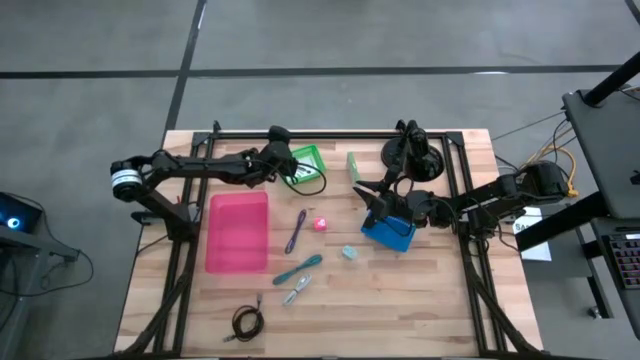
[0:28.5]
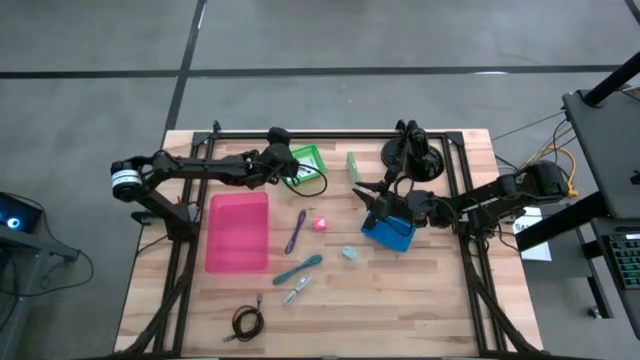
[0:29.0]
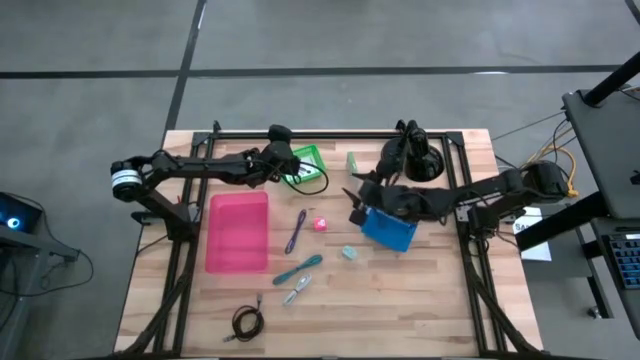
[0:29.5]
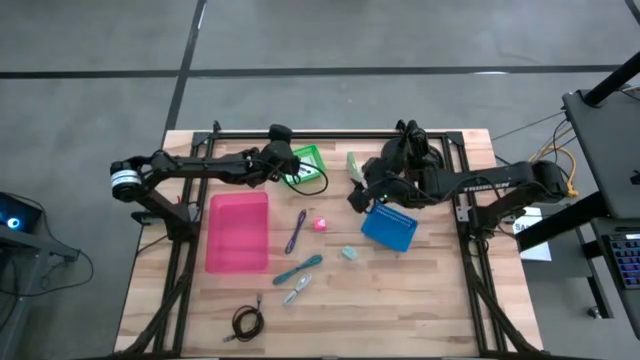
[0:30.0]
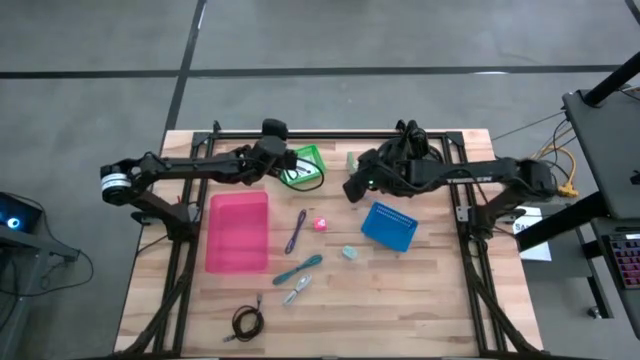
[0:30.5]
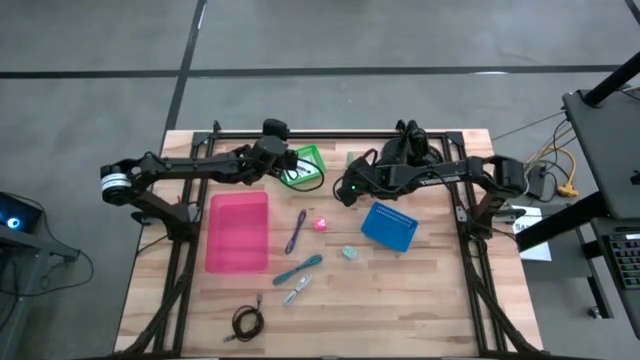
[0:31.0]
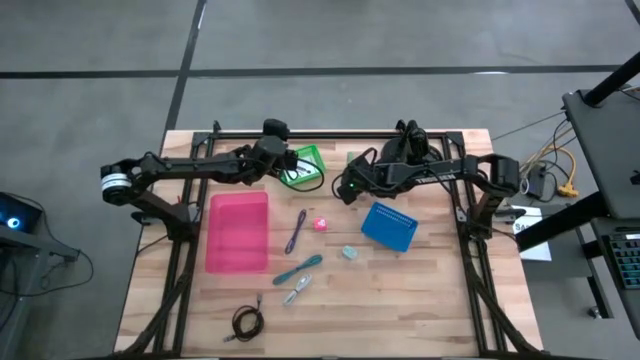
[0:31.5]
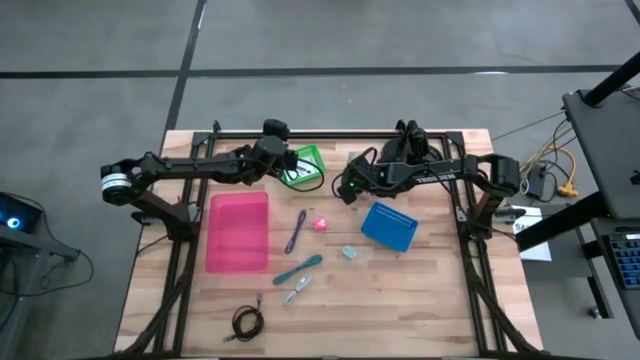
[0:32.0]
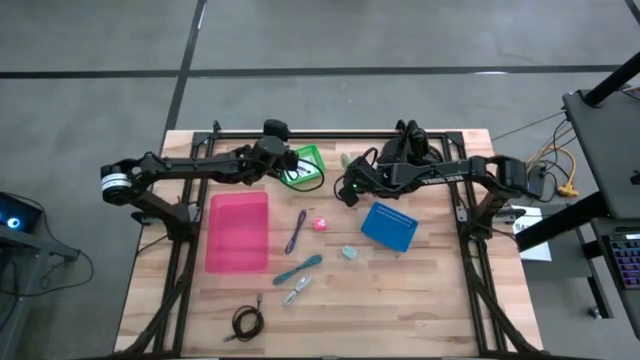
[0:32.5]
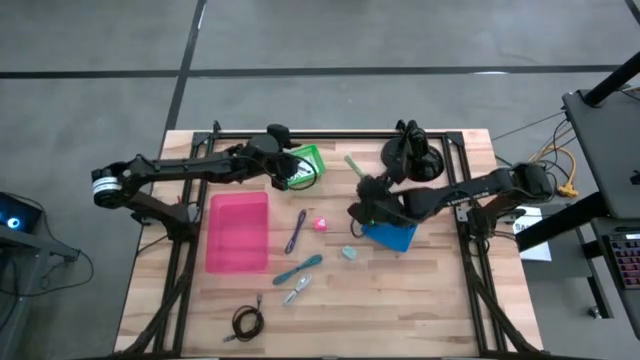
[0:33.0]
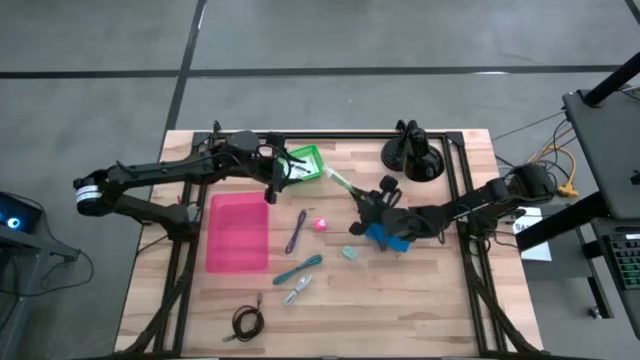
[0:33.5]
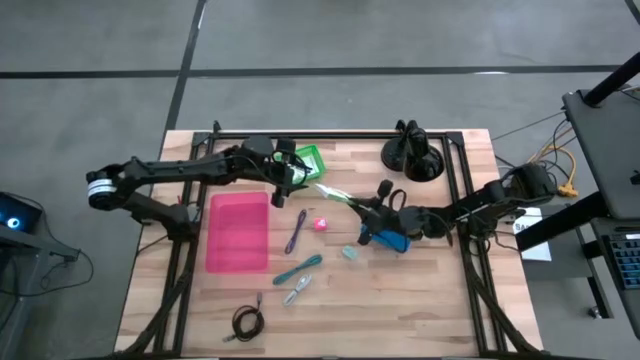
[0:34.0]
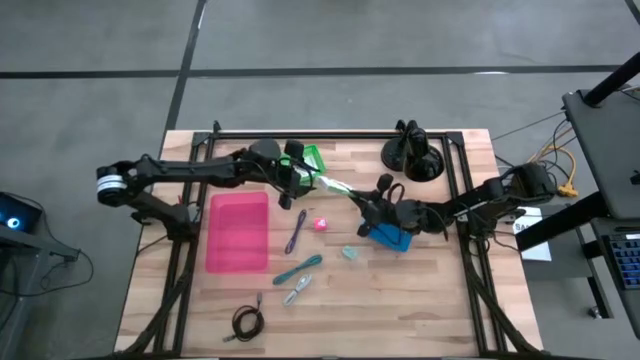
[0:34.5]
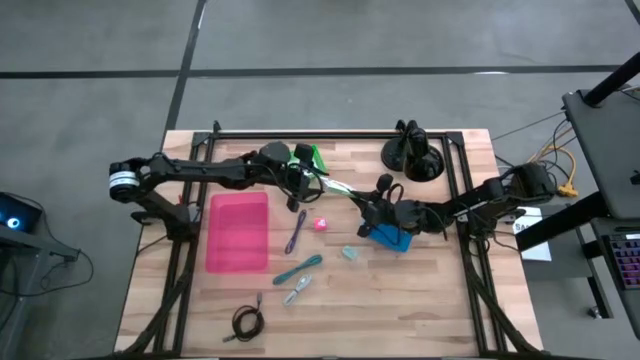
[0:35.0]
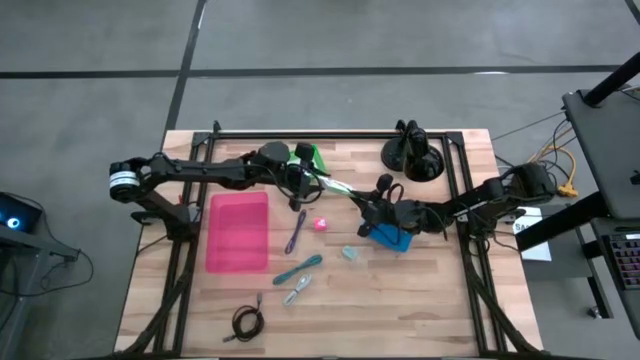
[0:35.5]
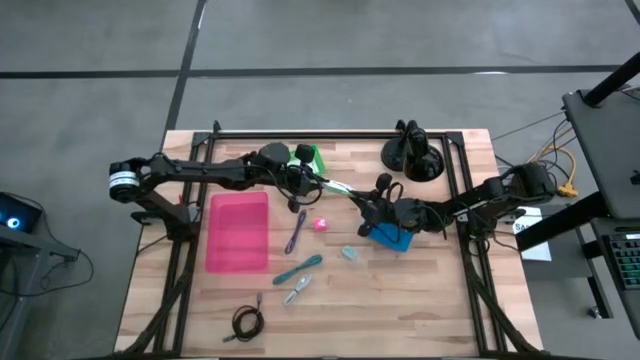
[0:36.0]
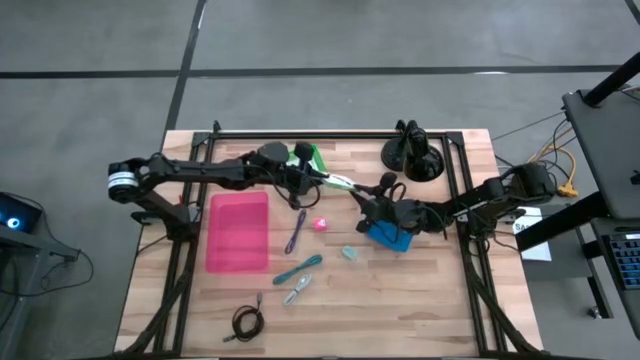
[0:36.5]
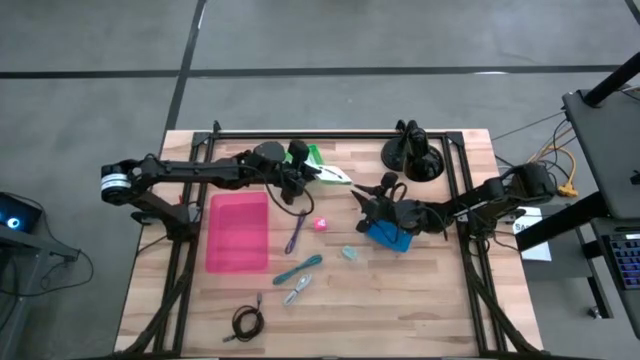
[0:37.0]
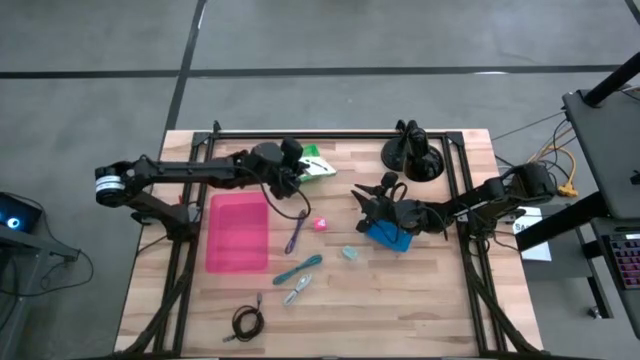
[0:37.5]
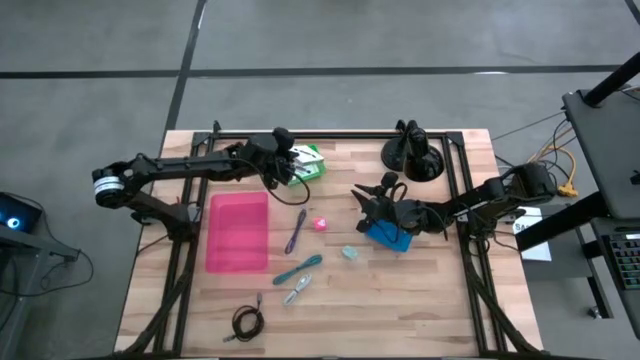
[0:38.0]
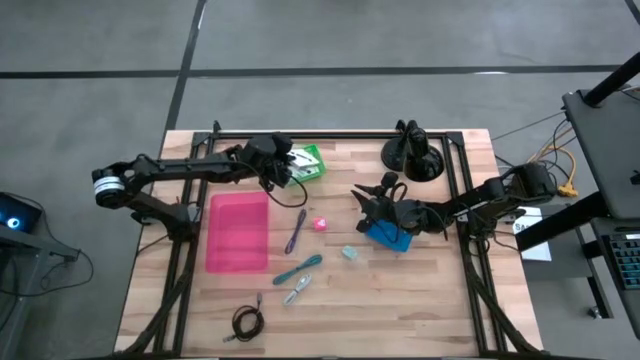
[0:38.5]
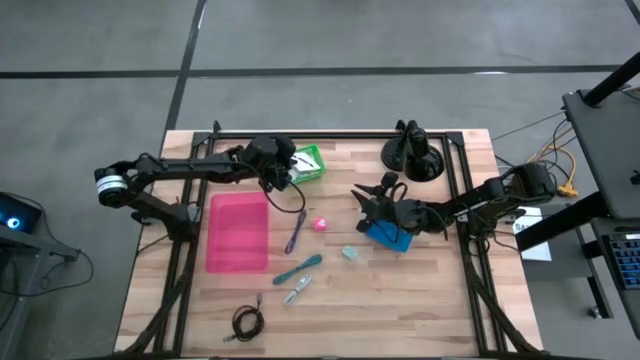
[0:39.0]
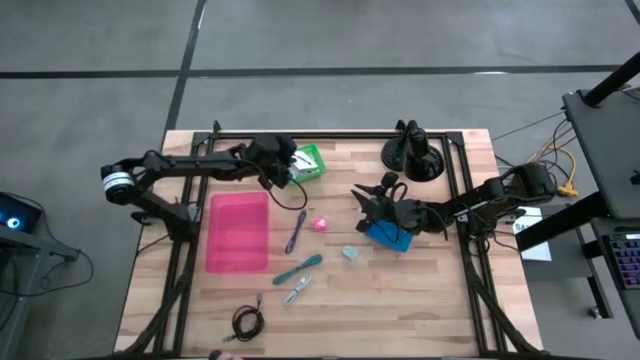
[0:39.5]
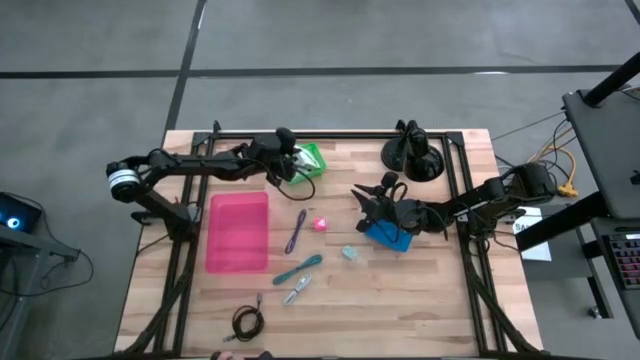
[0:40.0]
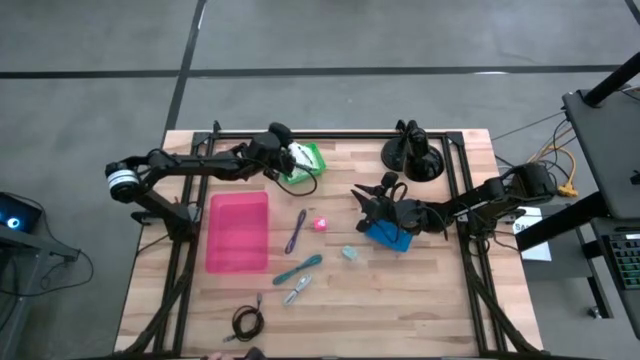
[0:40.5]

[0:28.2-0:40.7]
Task: Pick and place items into bin
Put the card reader box into the green bin

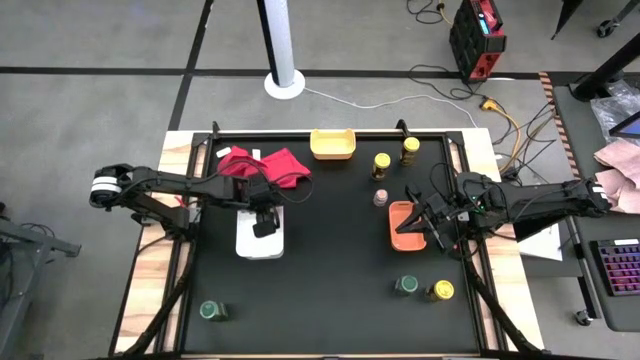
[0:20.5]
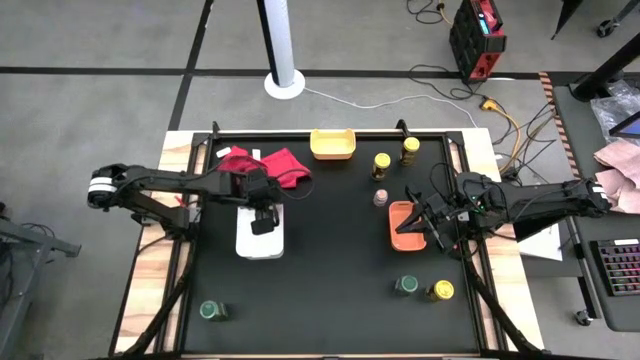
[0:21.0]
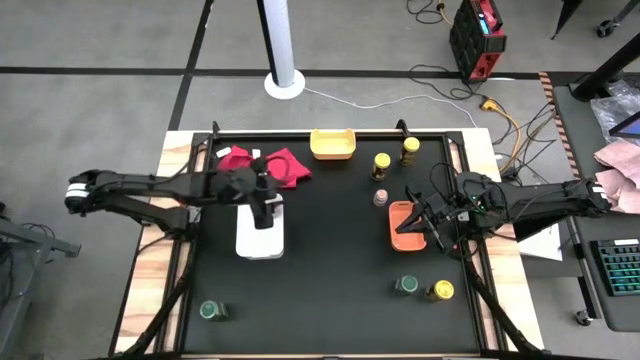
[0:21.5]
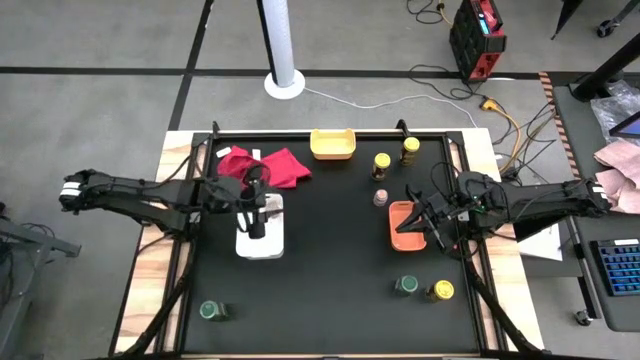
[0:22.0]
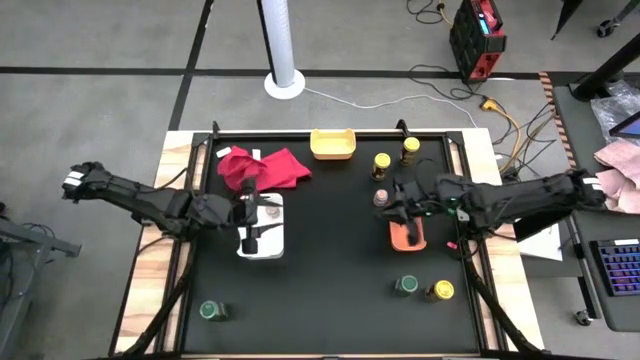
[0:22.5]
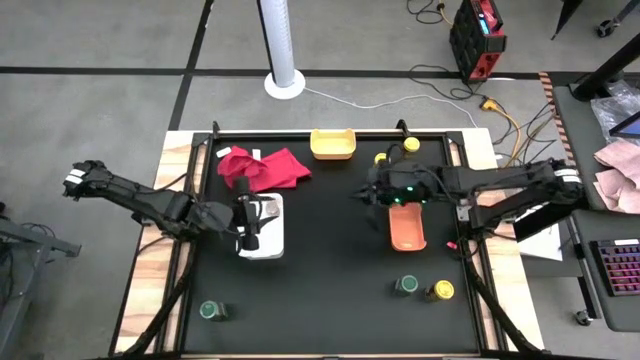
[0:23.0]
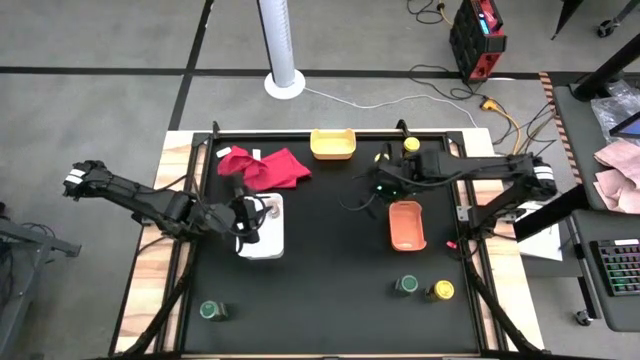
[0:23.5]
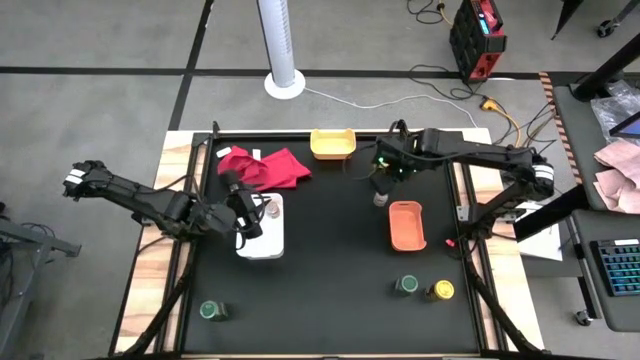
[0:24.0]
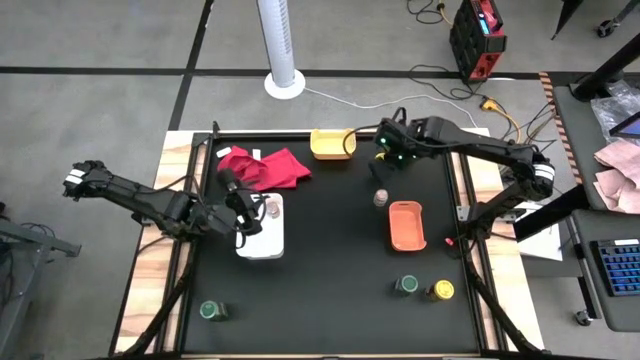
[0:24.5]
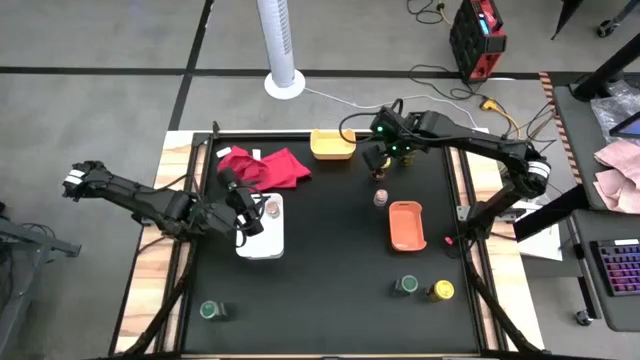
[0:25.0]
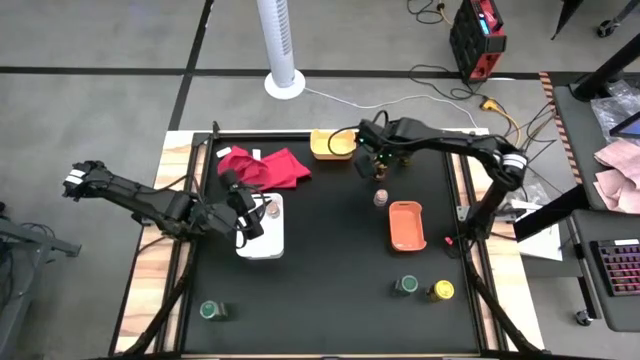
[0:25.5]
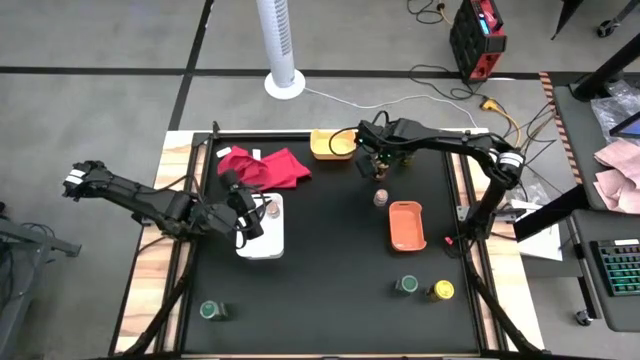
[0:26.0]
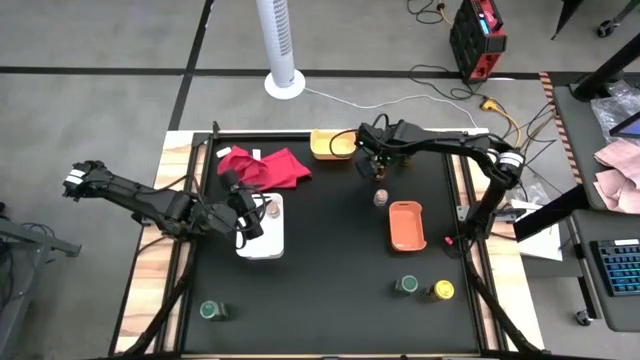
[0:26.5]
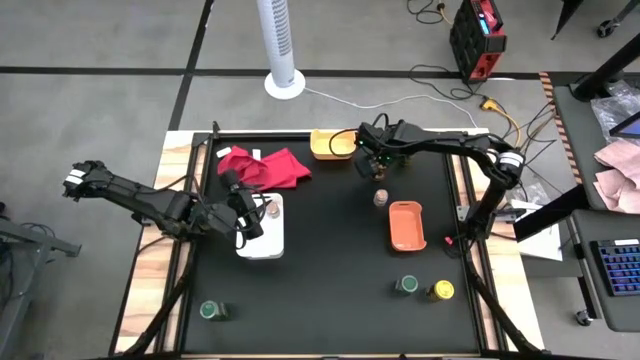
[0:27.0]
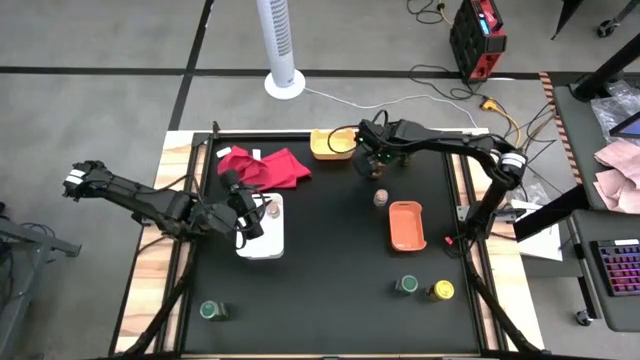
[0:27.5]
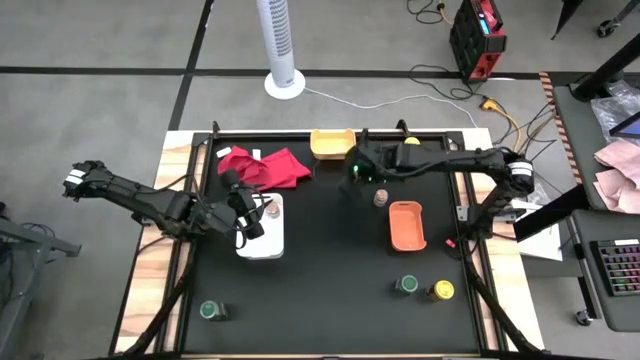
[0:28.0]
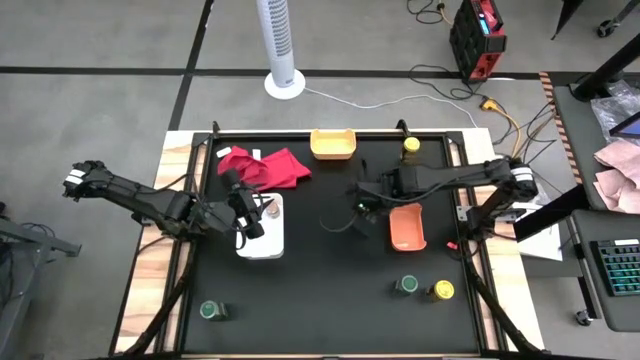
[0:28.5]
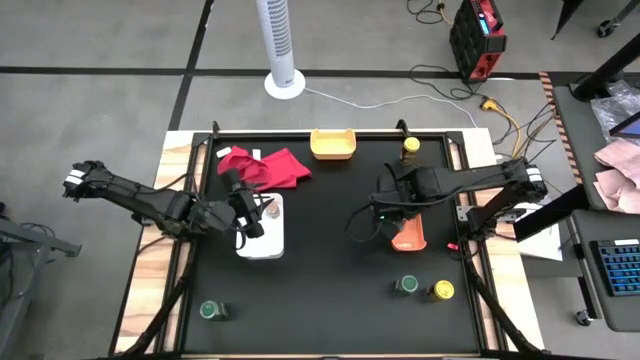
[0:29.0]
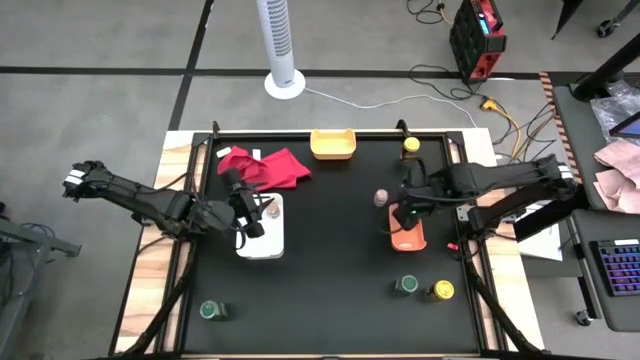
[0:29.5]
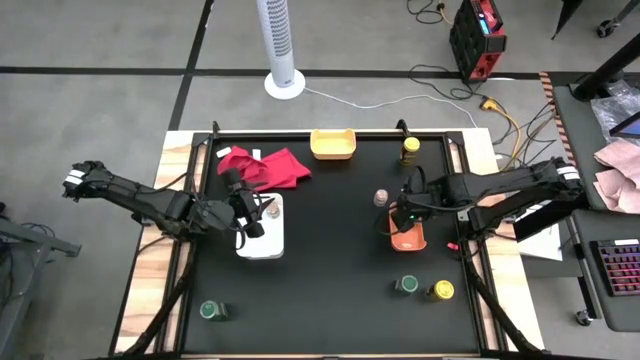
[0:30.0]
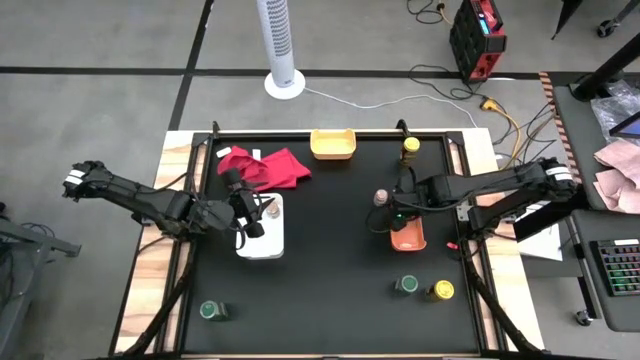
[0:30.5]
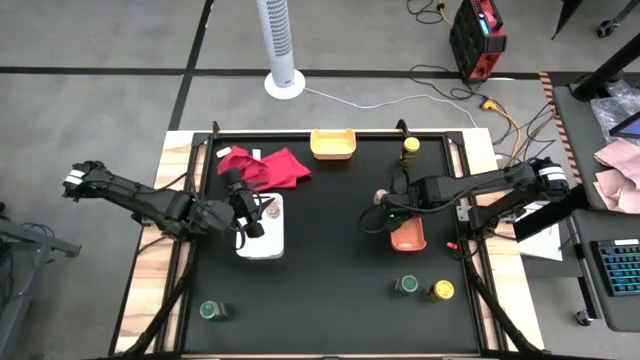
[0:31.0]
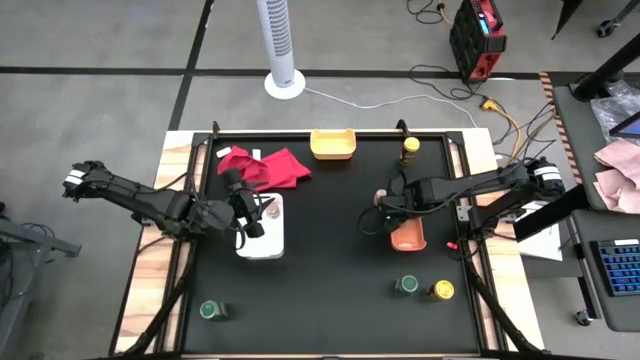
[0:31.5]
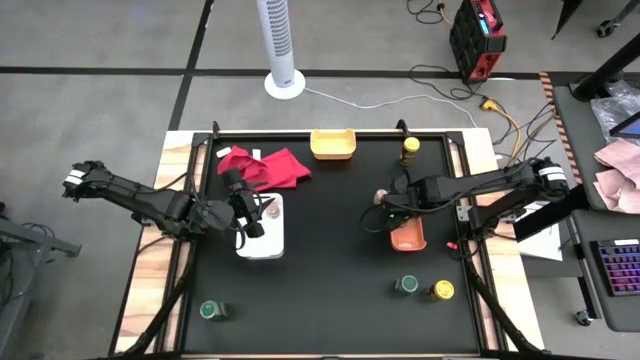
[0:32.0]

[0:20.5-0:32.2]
Task: Sort spices by type
Put the top left yellow seasoning bottle into the orange bin
